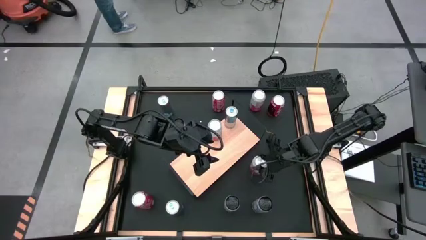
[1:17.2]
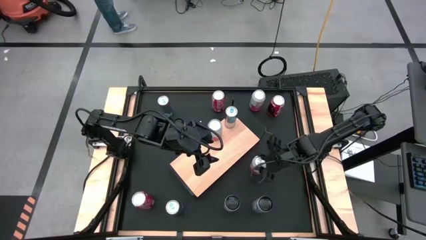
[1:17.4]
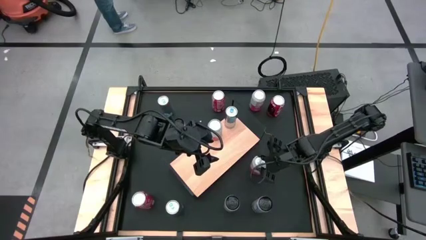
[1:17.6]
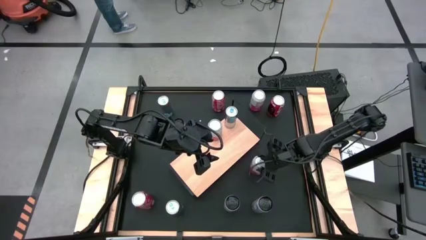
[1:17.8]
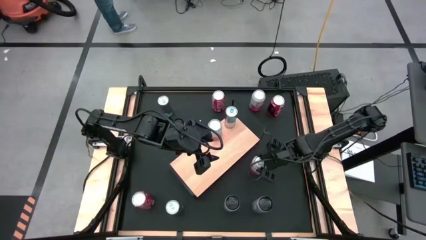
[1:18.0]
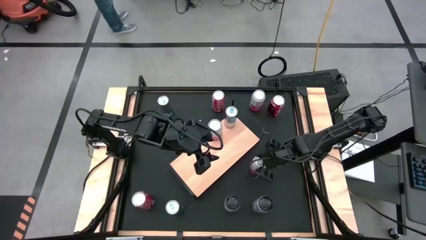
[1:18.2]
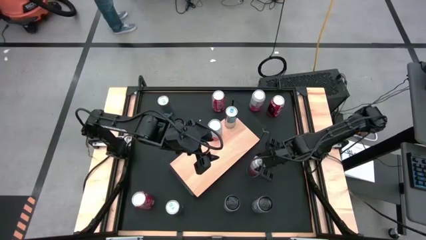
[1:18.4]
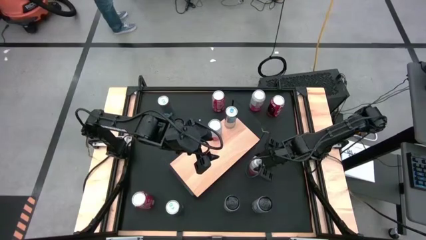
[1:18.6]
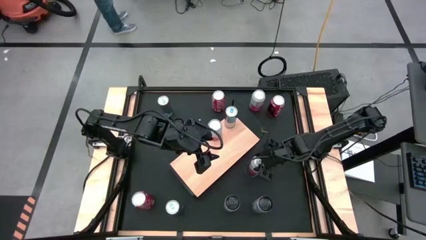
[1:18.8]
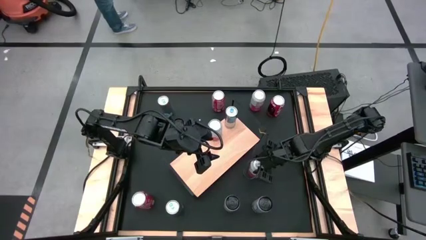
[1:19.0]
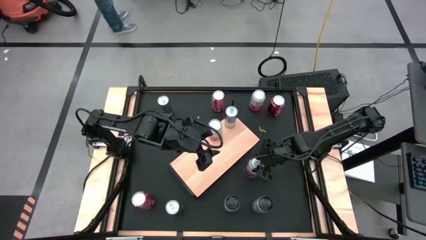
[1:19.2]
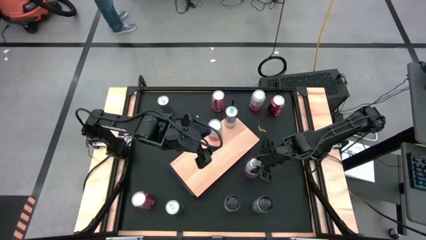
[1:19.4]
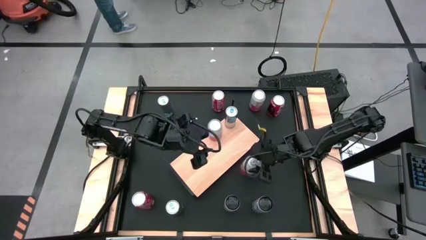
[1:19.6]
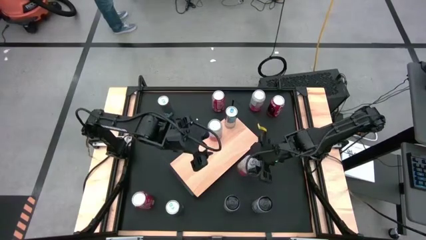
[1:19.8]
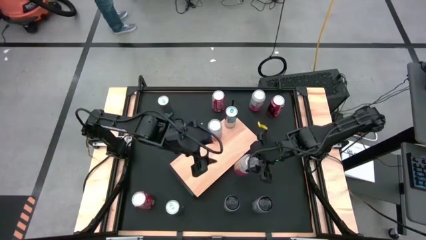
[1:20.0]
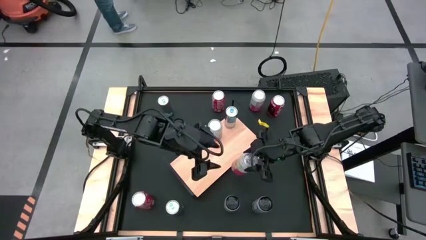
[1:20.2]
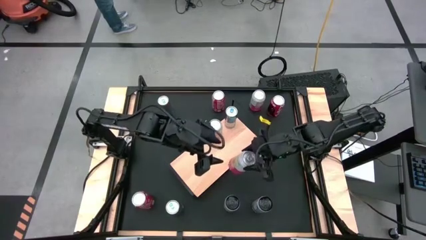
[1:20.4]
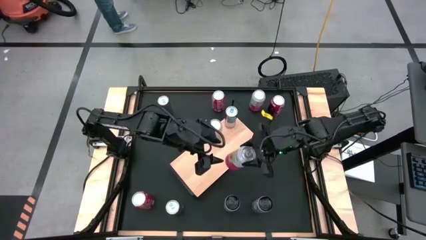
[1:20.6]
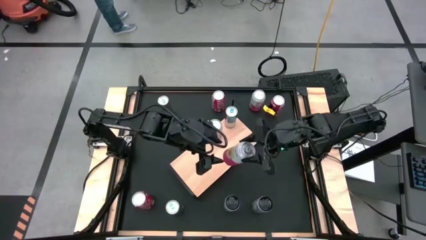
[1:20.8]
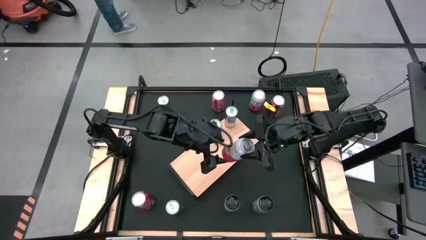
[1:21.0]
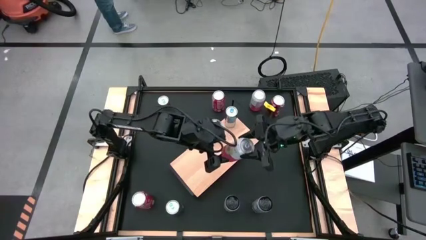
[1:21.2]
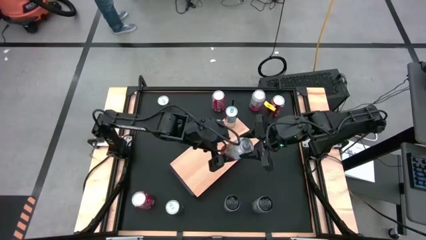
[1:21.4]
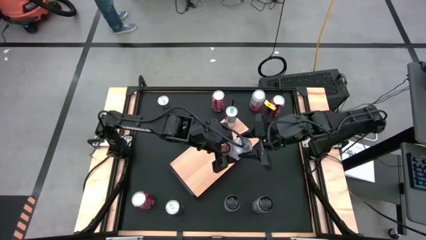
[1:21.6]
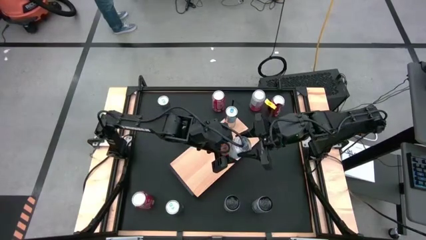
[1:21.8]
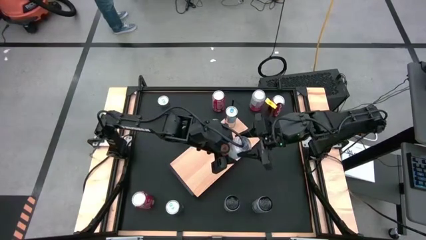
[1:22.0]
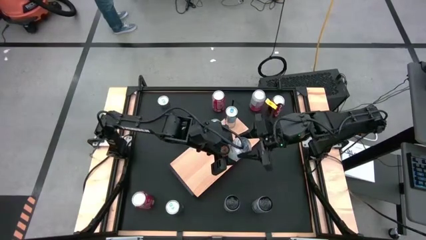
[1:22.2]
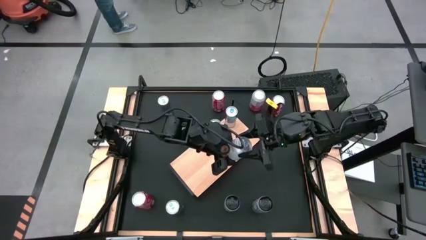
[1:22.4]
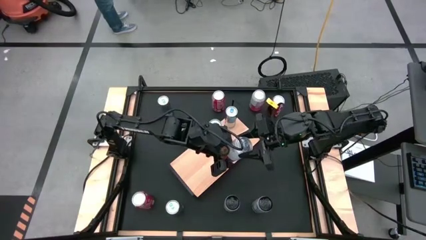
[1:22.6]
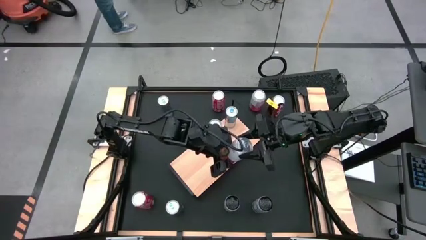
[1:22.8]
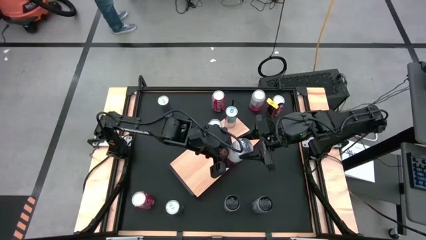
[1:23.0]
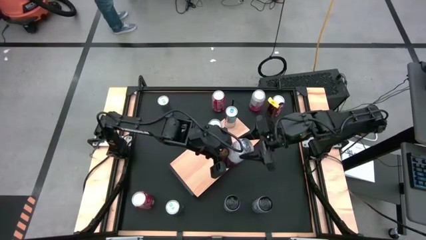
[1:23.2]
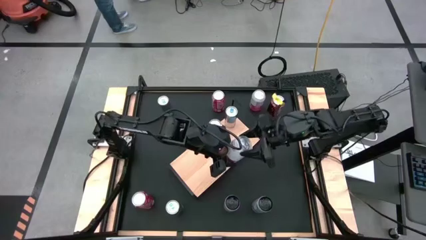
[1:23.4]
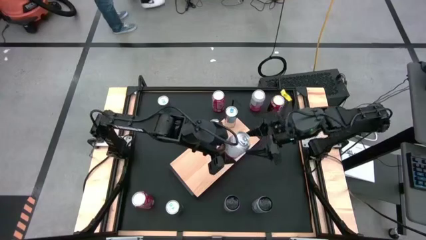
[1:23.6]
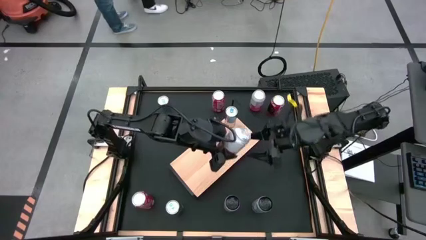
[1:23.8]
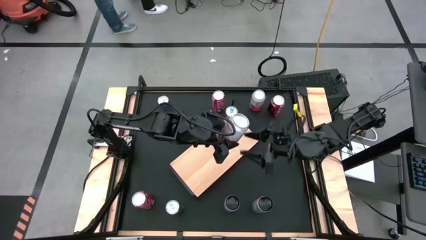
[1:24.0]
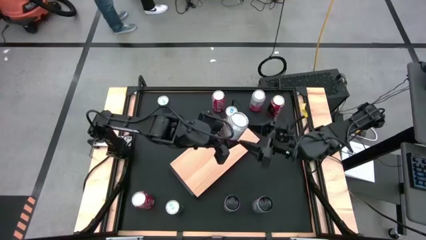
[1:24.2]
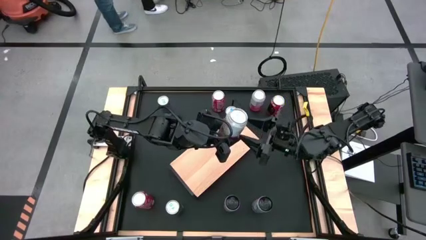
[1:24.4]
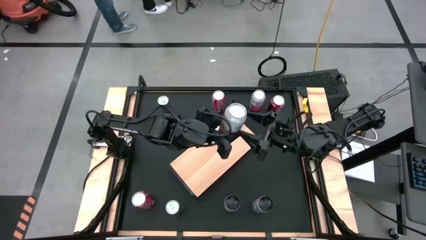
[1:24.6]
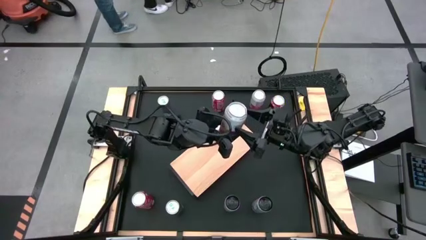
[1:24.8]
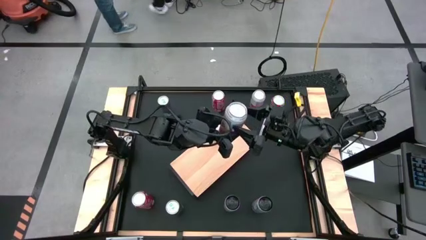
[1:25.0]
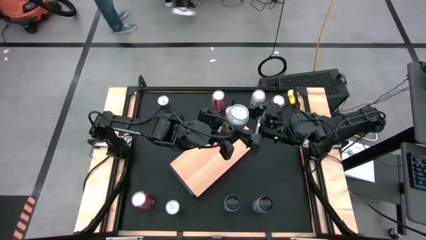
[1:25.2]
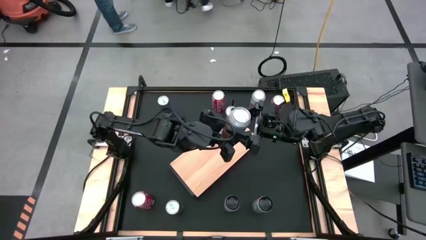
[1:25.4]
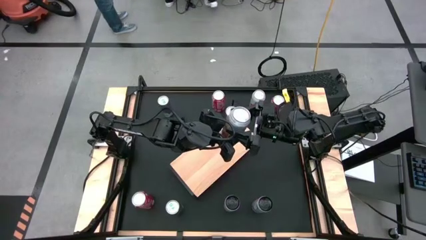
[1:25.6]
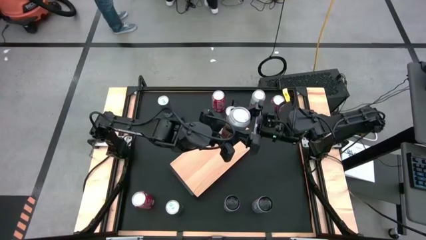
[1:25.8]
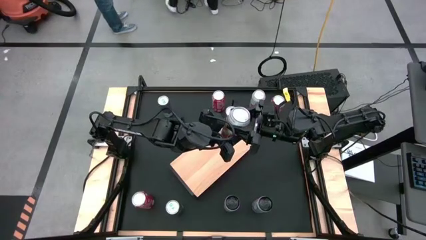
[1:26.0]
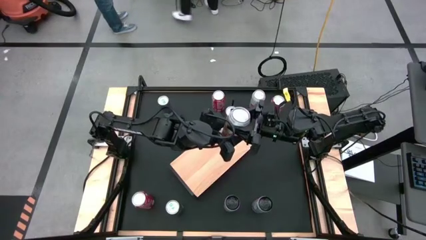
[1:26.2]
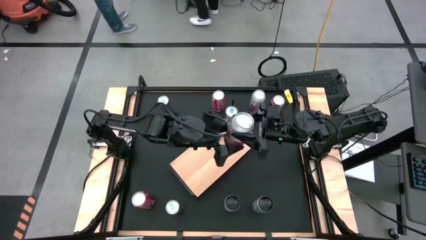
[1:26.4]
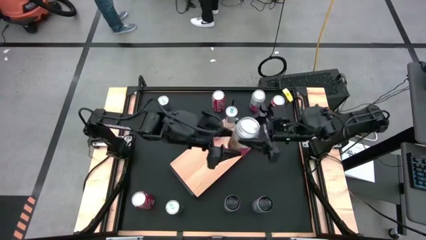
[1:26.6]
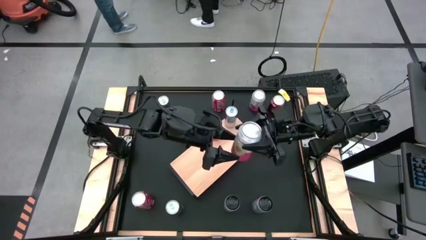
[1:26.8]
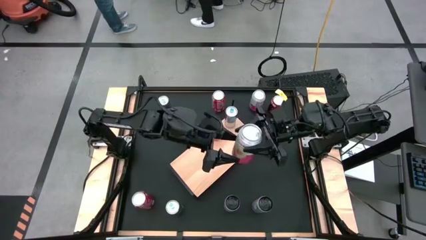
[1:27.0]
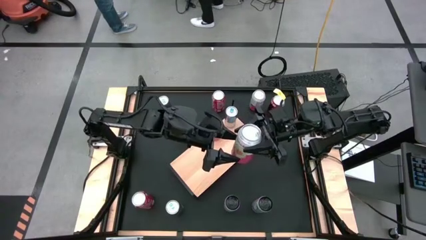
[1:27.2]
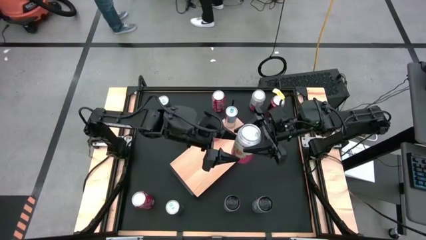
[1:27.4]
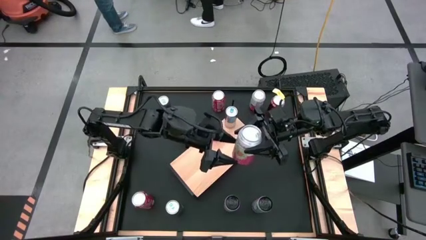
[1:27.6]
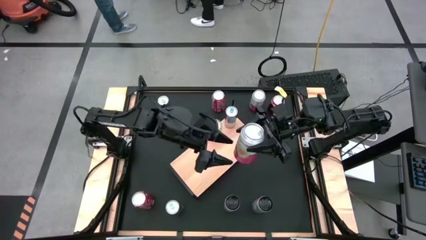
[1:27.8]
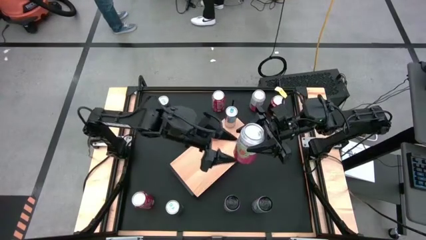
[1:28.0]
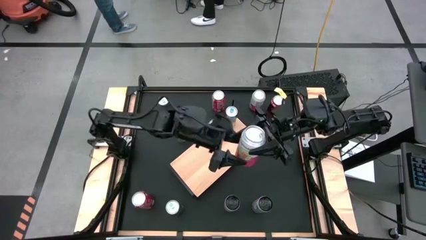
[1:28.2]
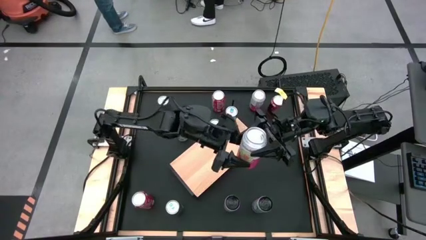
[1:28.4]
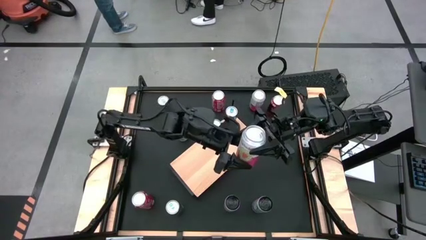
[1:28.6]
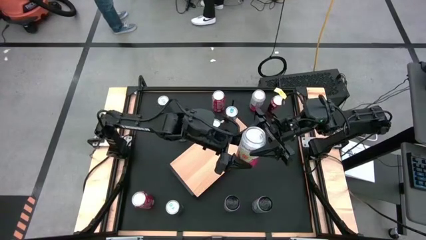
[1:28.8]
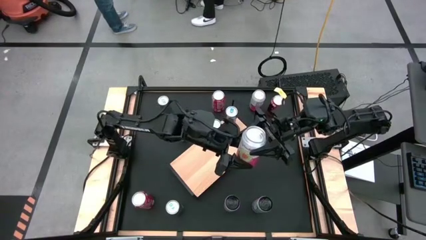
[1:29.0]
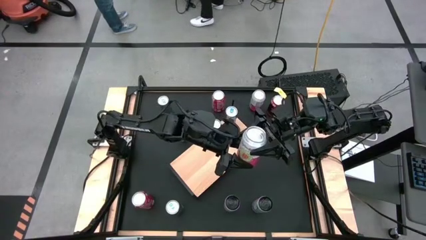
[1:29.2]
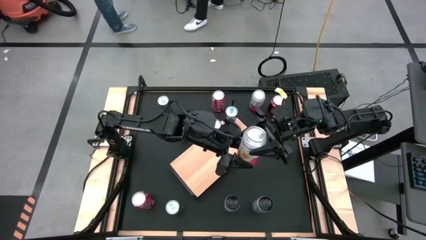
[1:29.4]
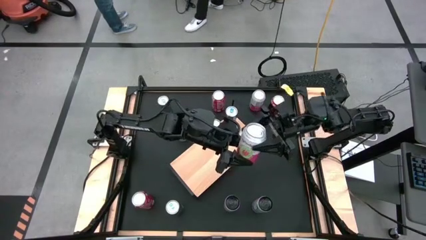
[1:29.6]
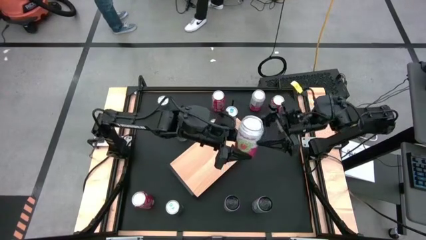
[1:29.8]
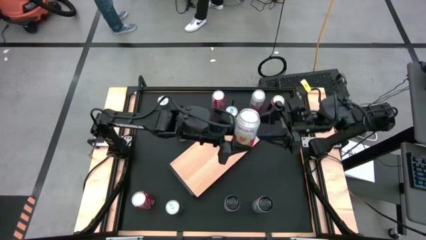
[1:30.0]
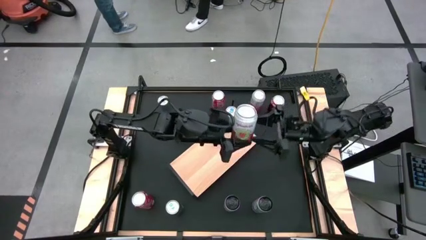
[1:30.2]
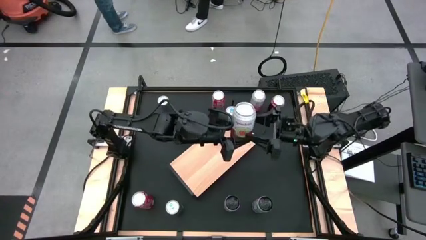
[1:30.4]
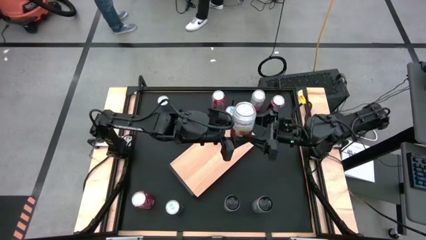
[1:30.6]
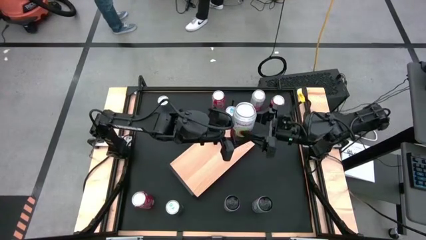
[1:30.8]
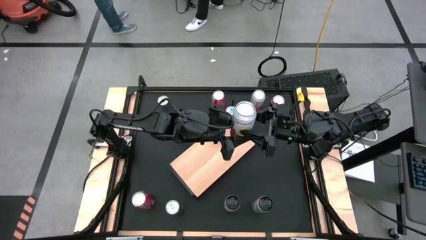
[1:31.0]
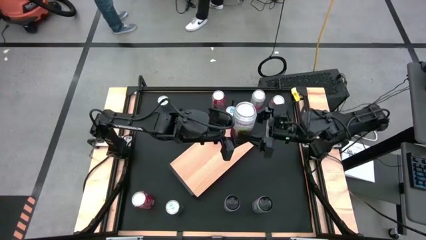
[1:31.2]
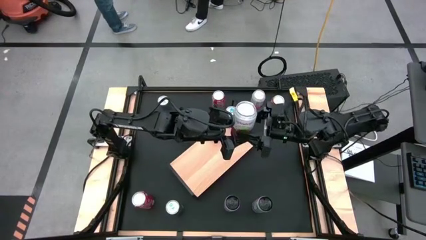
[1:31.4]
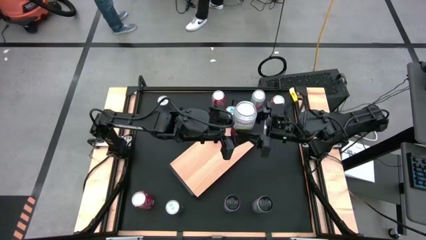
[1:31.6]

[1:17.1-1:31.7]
Task: Place canned beverage on shelf
Put the bottom pink soda can on the shelf aligned with the other pink soda can
